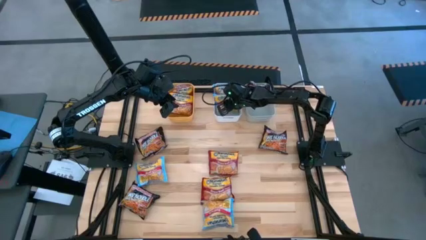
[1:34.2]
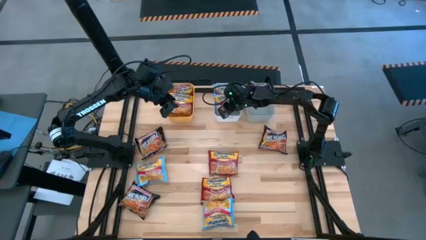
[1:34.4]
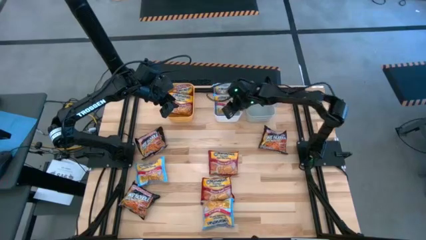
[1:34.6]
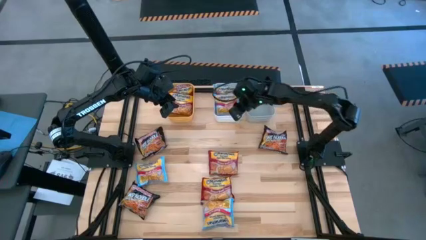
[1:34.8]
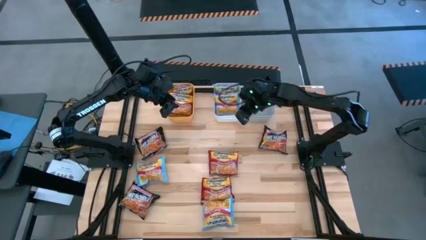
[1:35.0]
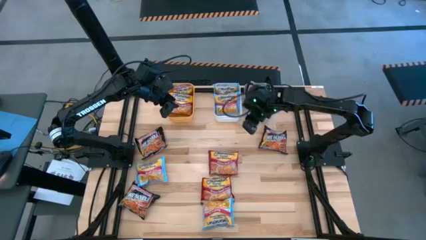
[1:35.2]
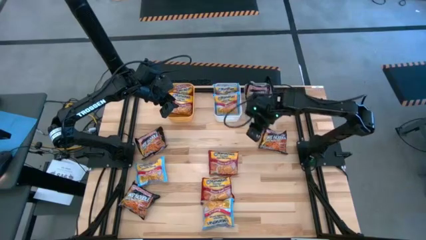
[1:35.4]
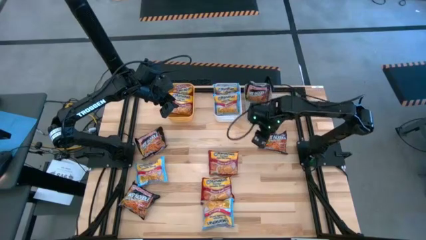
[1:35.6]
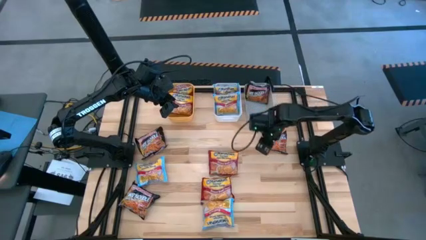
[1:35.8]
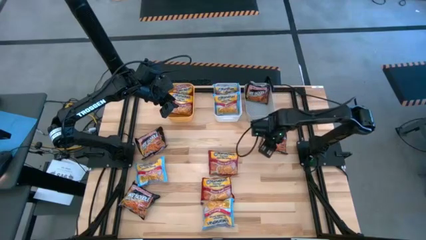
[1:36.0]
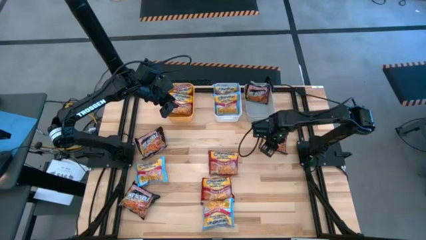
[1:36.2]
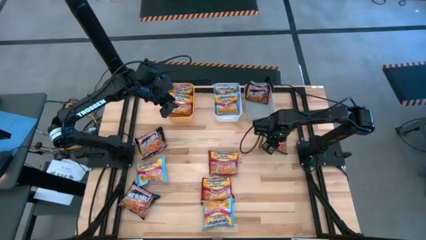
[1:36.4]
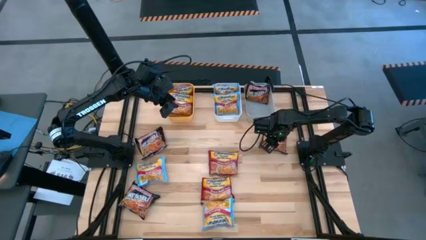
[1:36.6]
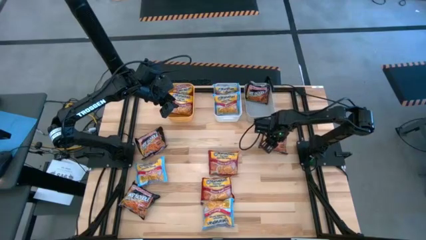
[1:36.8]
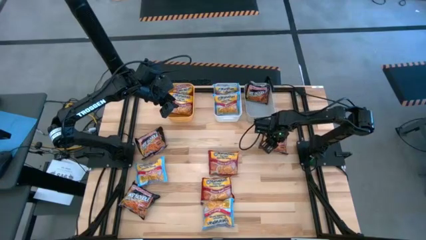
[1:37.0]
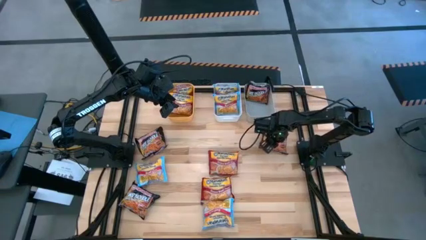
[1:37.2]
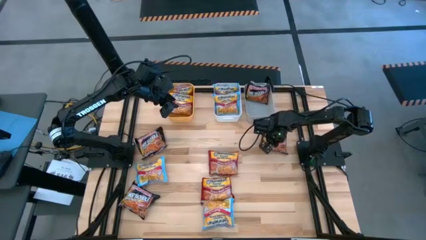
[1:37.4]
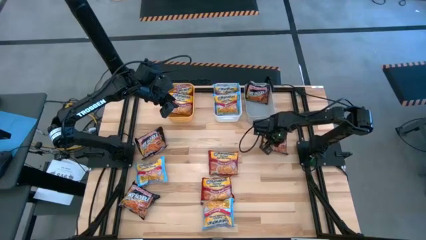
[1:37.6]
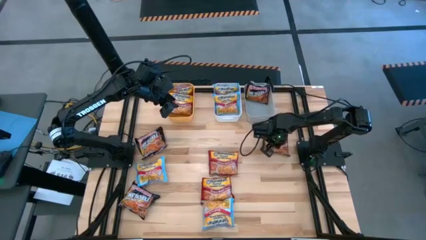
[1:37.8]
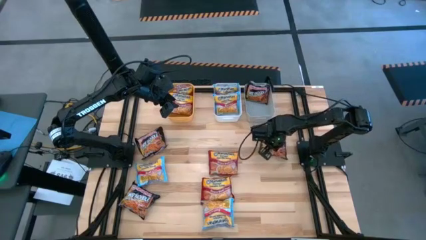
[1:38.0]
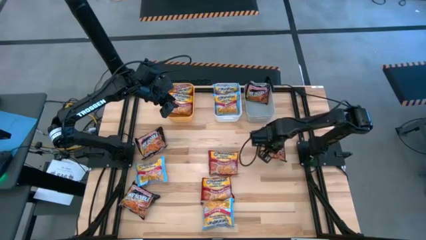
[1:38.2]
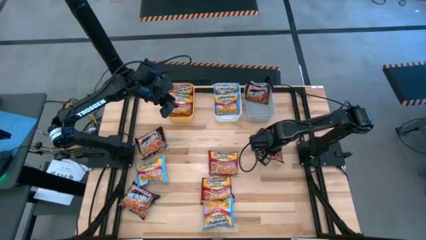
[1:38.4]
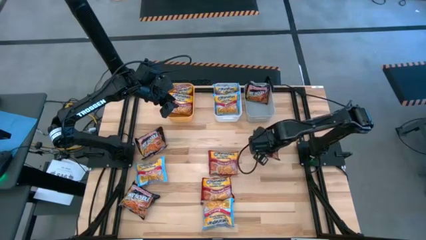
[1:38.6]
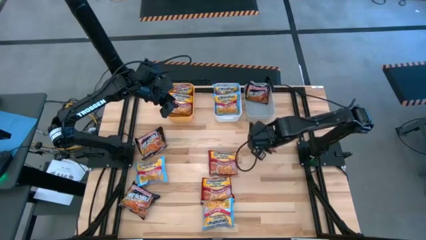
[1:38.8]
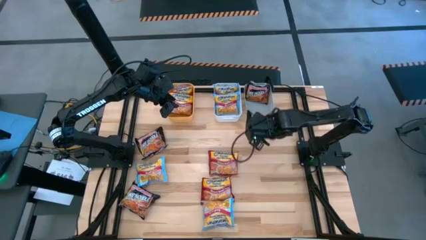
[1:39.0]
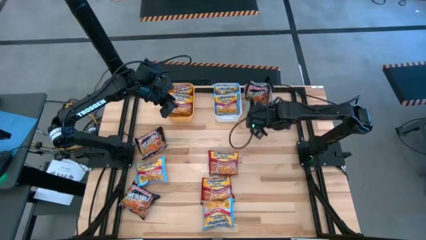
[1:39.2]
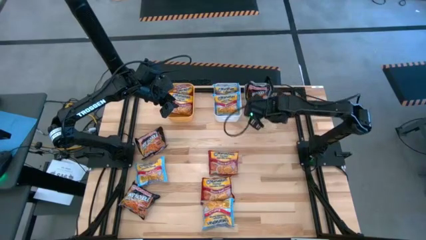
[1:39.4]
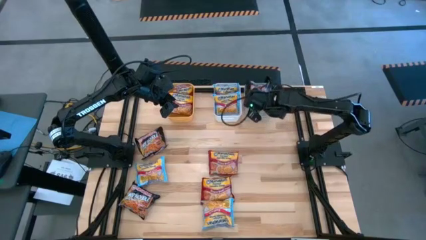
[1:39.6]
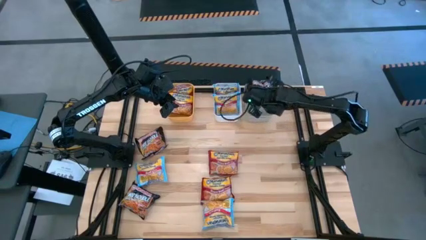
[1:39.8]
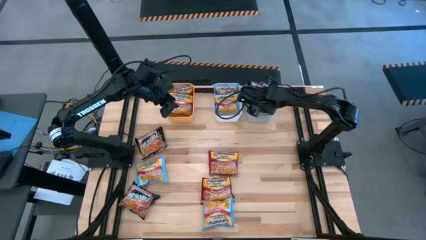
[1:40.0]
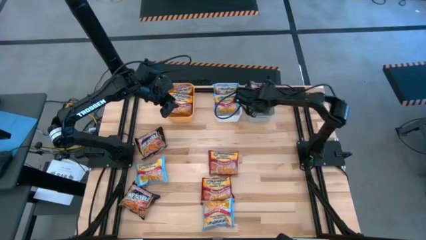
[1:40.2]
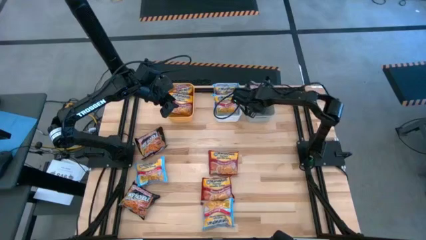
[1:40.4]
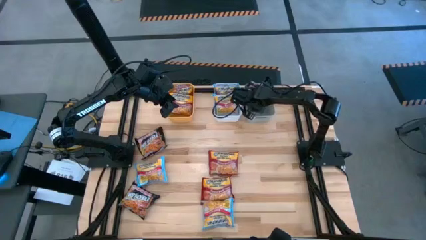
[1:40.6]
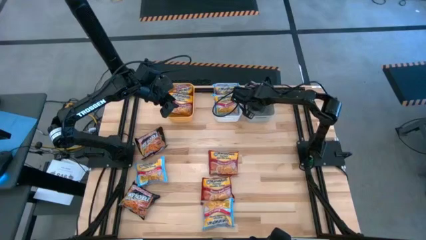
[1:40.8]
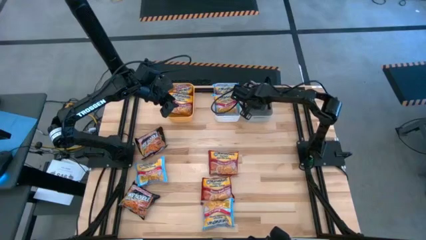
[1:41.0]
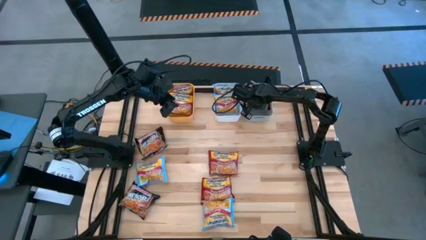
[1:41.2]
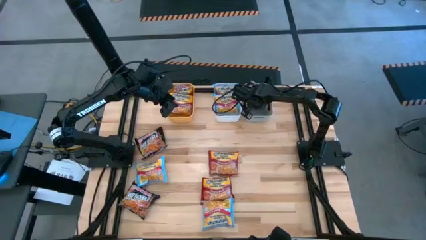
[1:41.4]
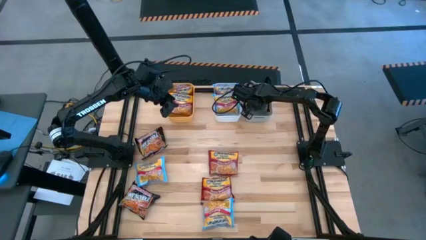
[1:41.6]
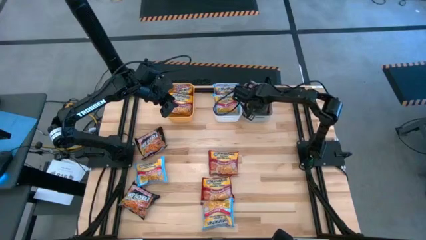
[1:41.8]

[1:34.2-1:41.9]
Task: Sort Maruchan noodles
Put the black noodle pack into the gray bin

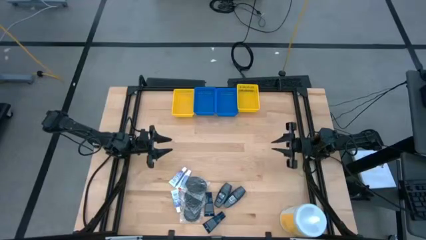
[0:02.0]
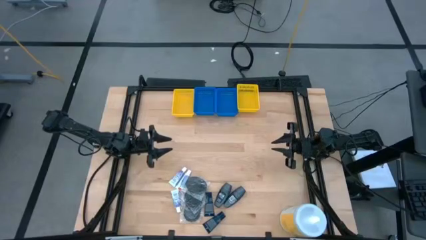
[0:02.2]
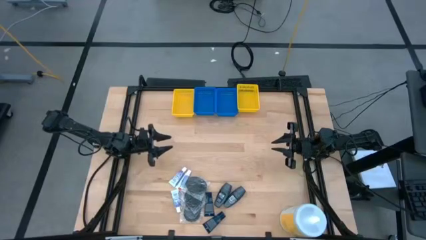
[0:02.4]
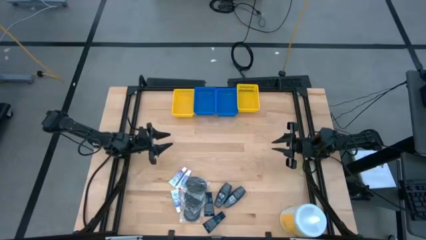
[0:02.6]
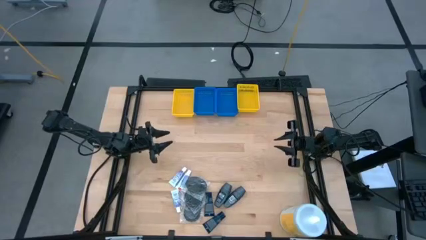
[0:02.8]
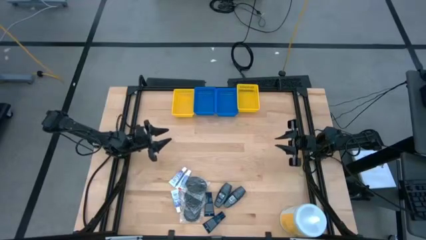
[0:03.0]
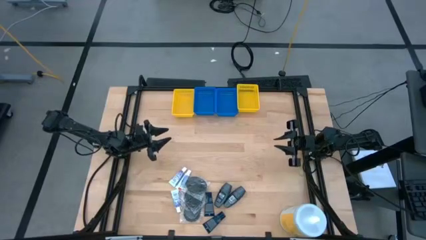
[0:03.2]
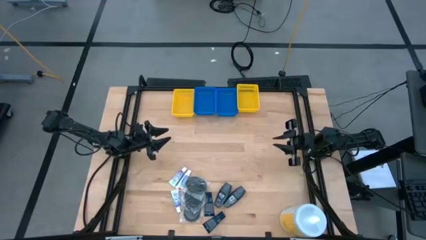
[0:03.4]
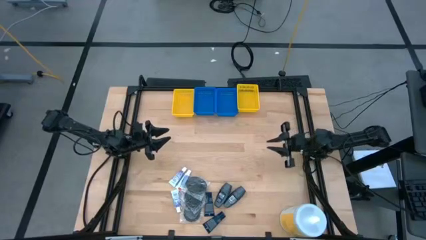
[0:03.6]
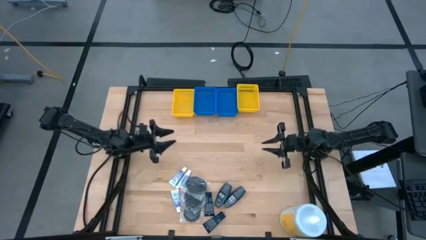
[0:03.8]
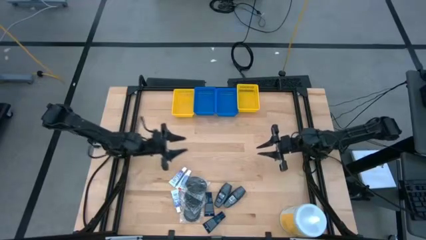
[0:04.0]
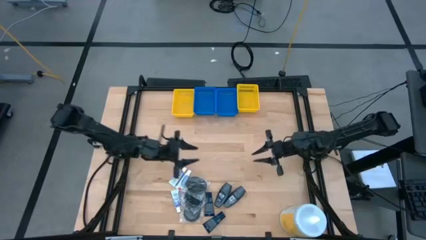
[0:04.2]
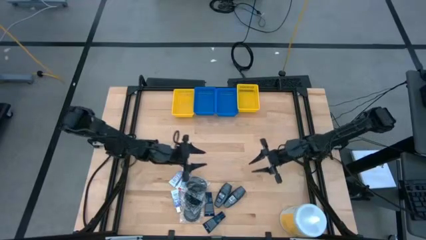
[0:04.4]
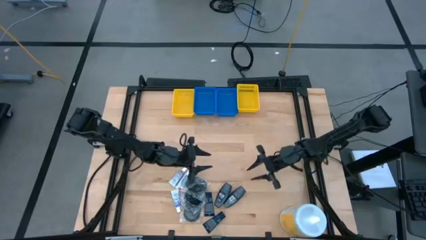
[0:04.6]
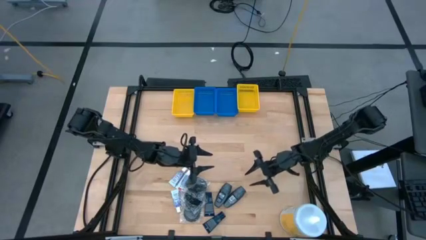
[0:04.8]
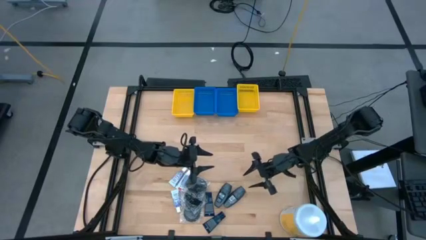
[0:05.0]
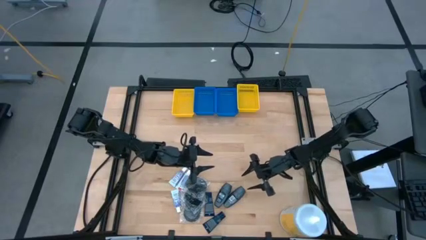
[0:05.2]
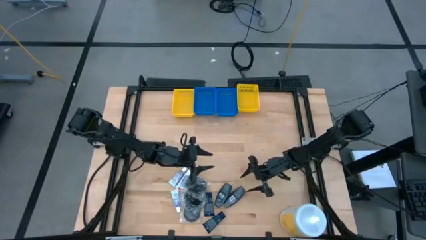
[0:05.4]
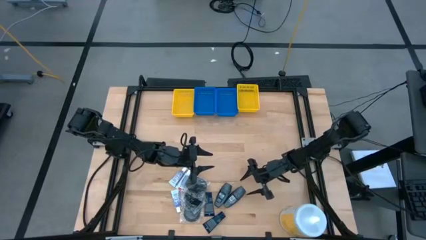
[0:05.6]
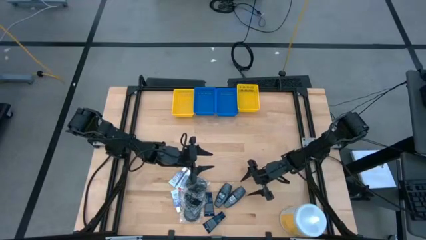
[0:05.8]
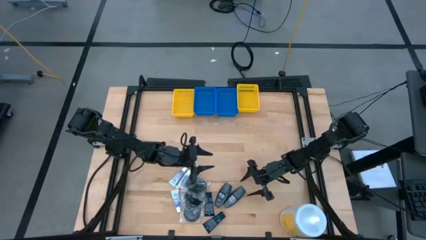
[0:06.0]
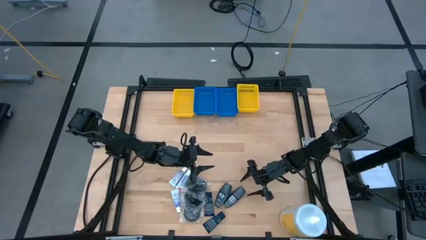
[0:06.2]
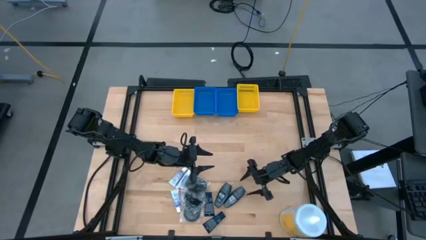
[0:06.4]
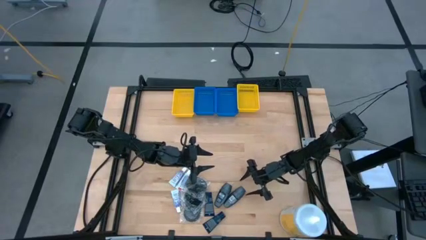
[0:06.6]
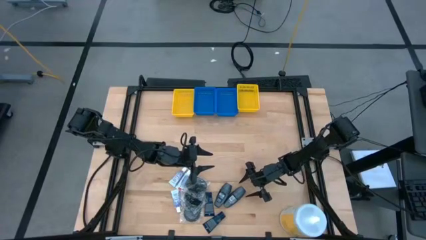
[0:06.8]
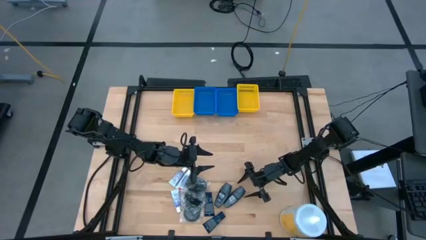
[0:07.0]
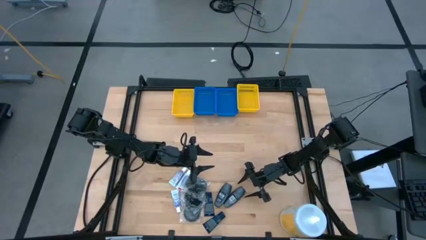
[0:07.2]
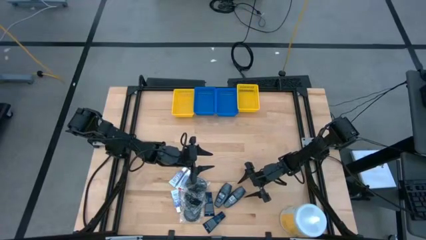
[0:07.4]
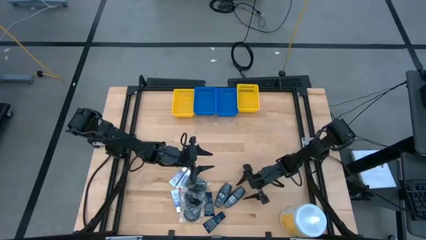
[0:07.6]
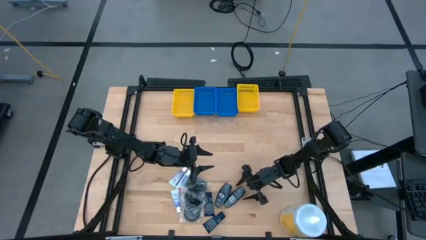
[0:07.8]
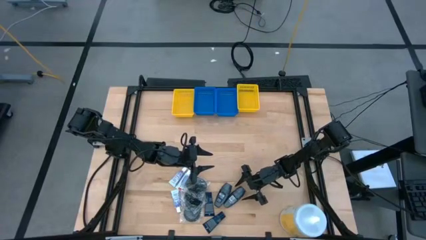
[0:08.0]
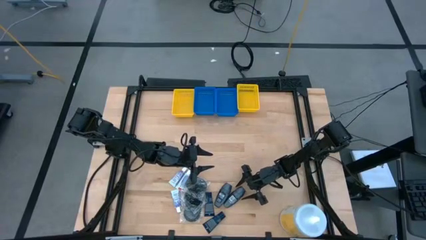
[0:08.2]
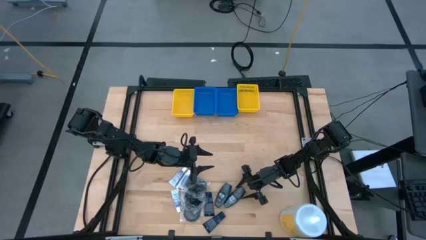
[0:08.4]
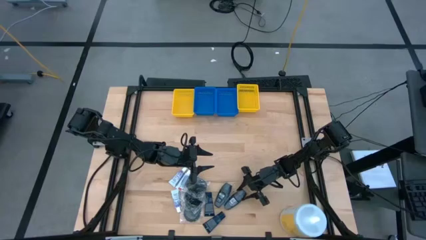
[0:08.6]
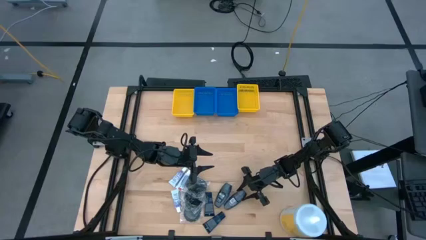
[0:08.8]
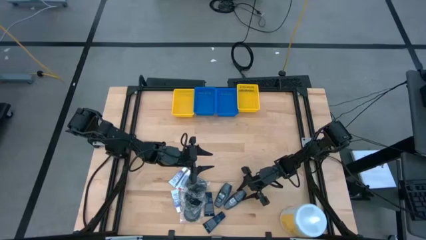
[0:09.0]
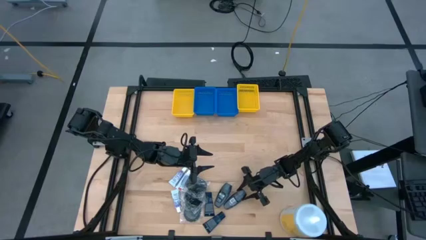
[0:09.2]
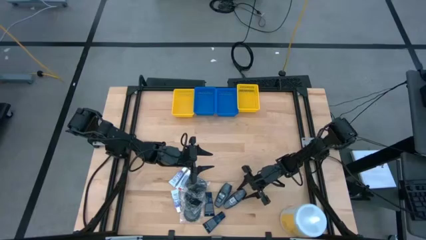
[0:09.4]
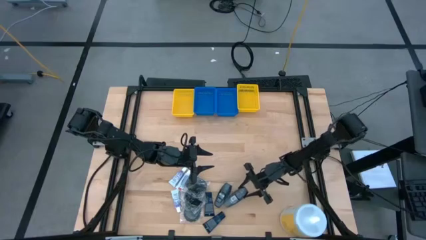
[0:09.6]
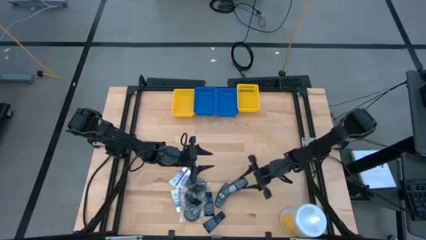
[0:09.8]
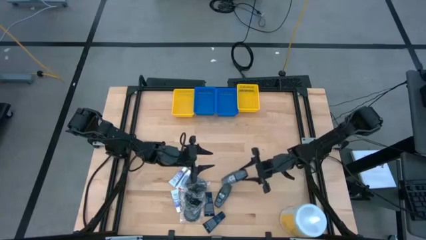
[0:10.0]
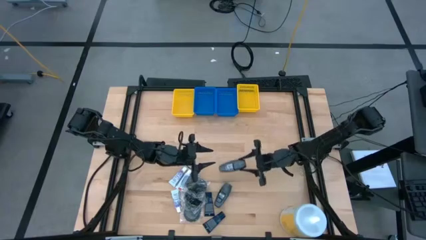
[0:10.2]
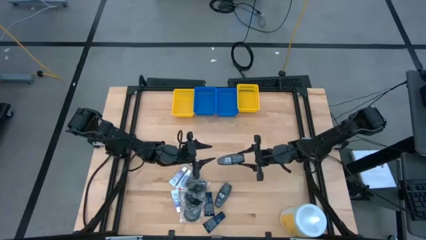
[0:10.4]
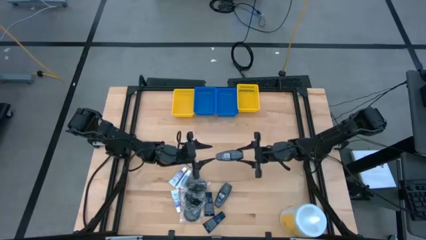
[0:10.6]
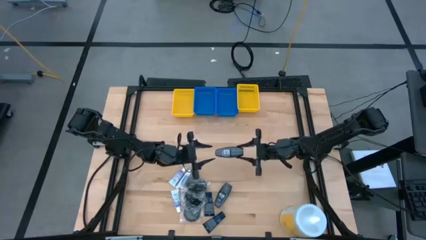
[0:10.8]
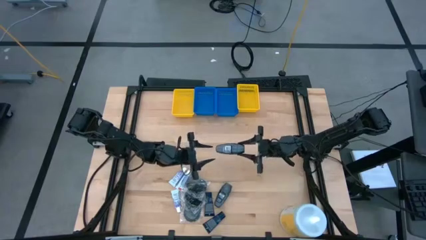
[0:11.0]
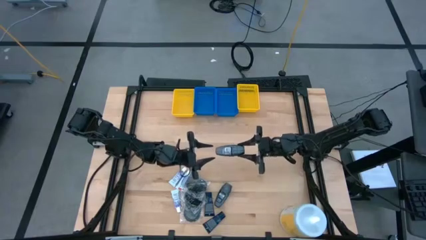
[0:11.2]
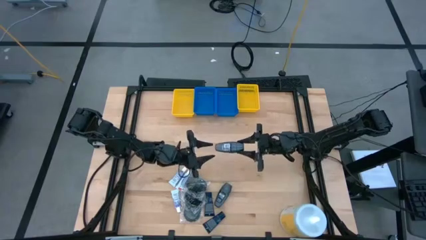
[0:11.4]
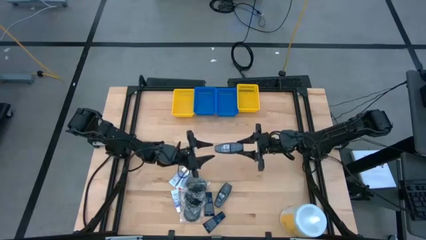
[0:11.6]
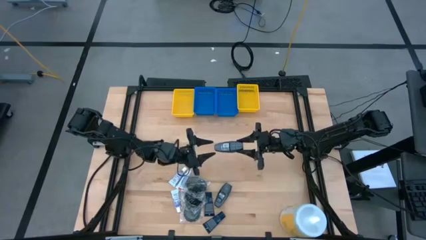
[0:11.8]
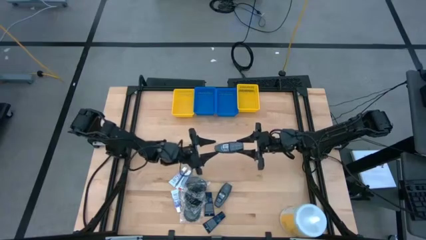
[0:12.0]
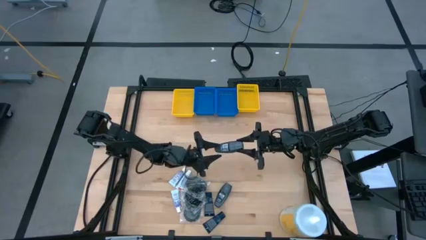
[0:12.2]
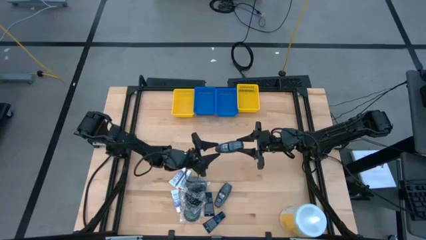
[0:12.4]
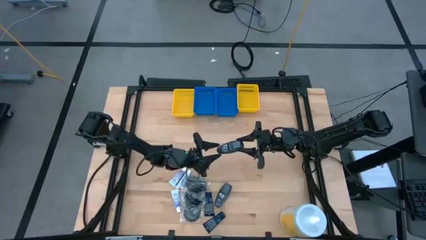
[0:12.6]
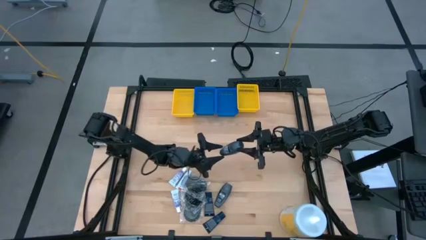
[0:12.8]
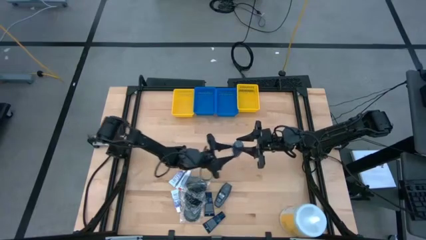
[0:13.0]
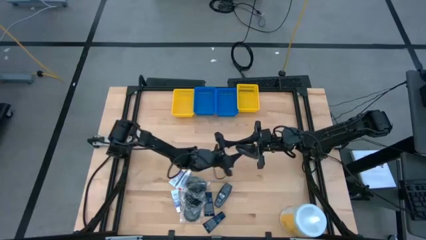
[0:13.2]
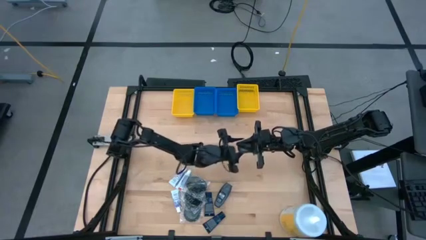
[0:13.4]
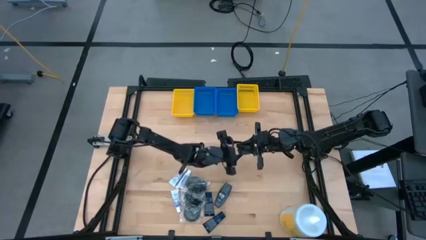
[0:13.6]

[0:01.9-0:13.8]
Task: Pick & Place Travel size toiletries
Put the black deodorant into the left blue bin
